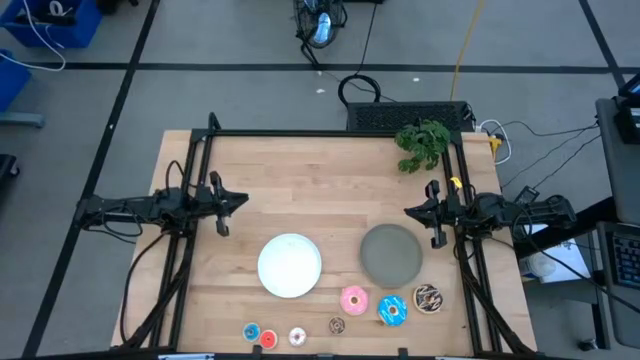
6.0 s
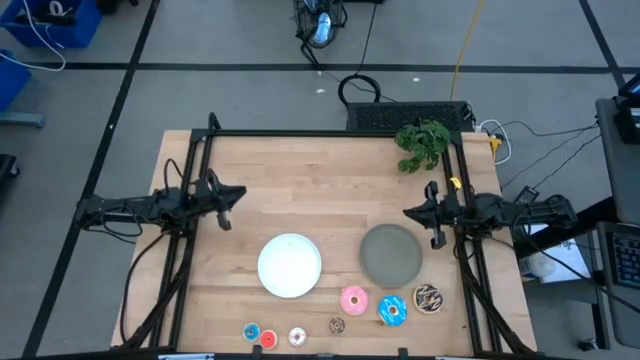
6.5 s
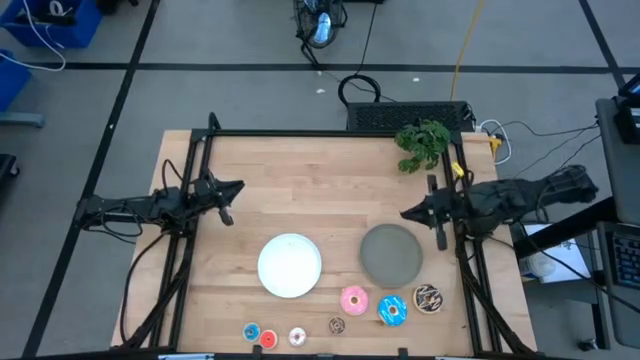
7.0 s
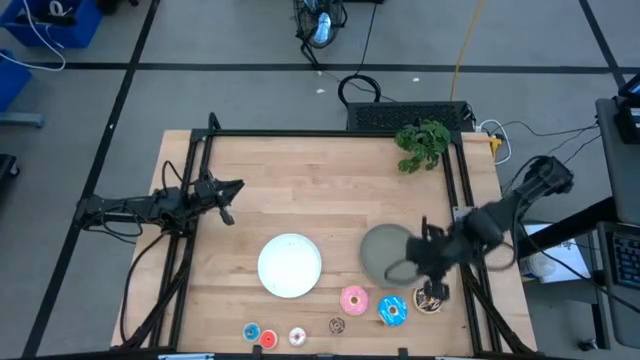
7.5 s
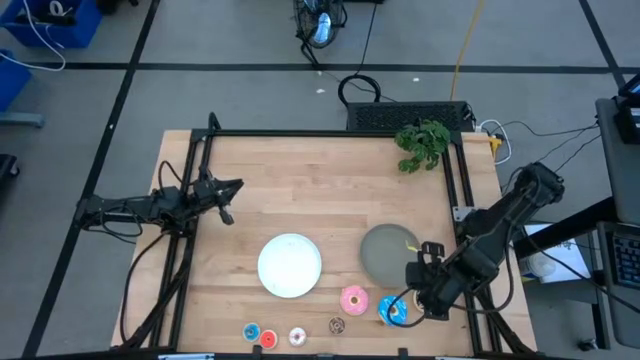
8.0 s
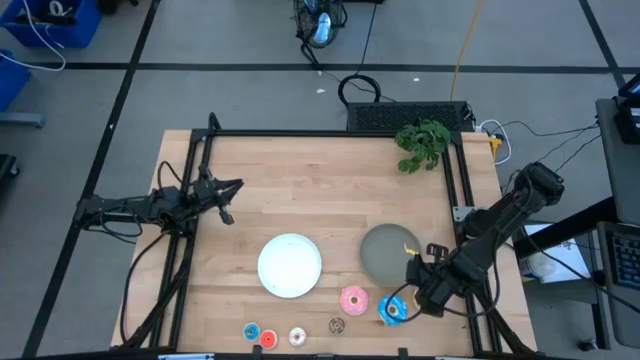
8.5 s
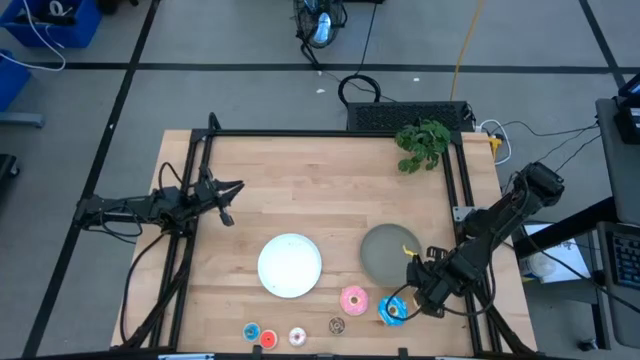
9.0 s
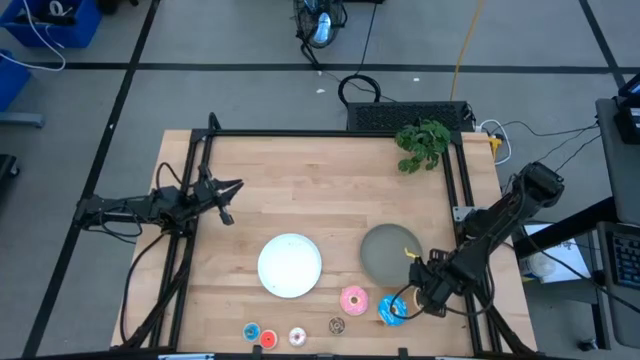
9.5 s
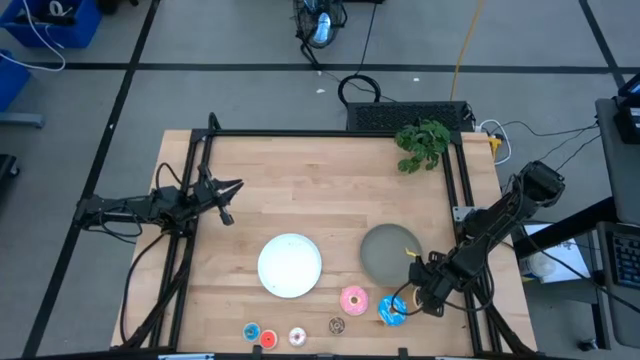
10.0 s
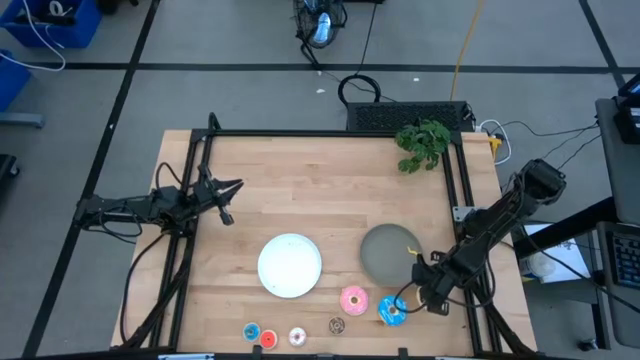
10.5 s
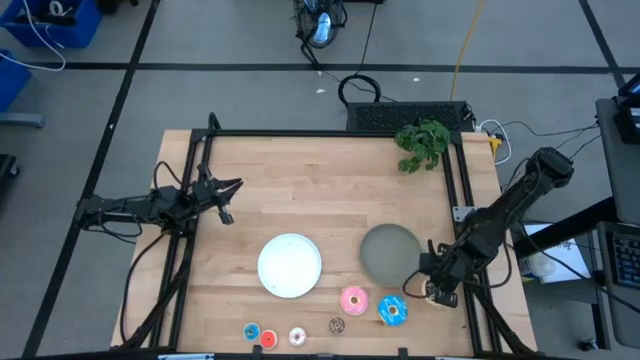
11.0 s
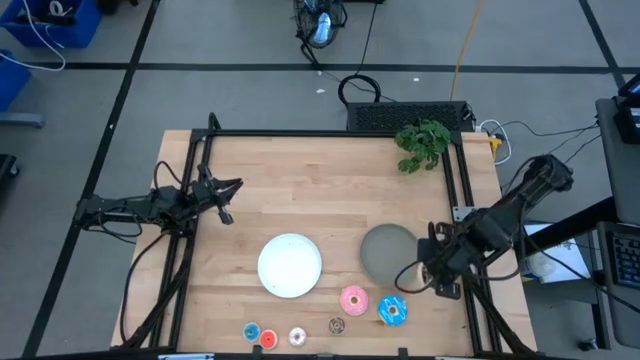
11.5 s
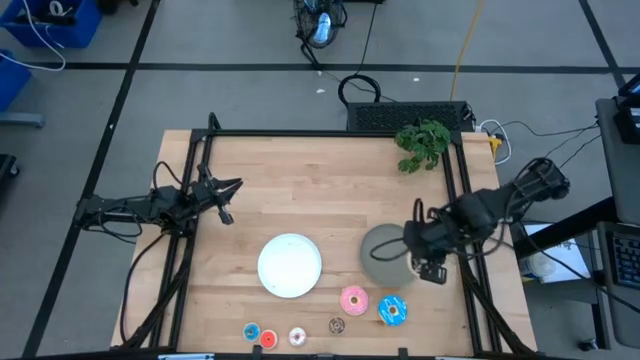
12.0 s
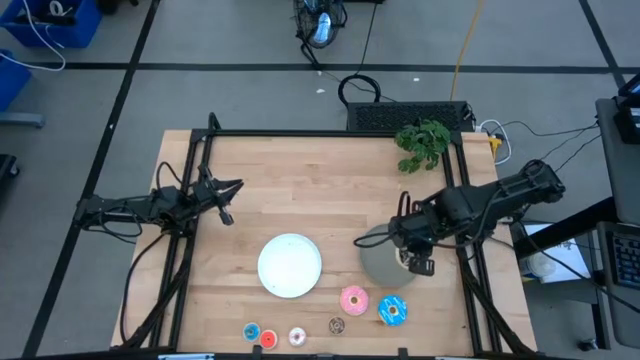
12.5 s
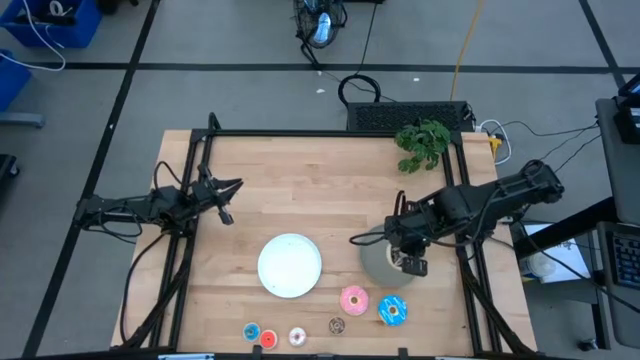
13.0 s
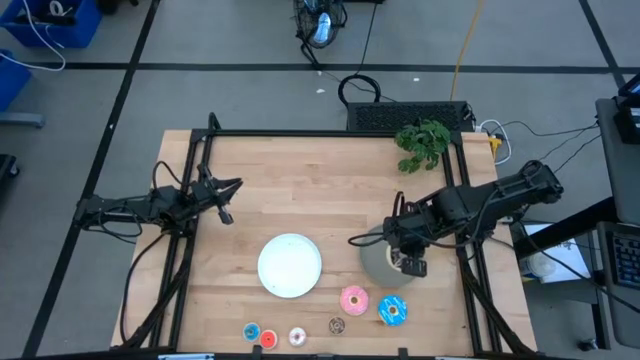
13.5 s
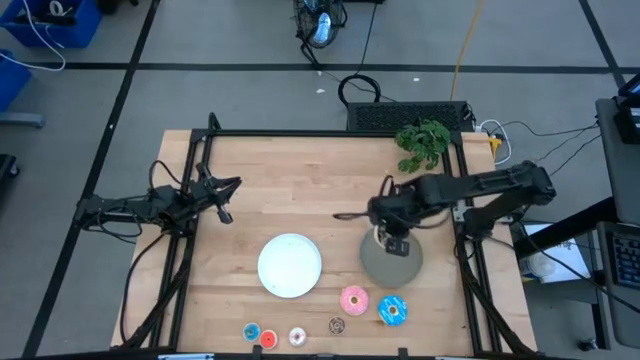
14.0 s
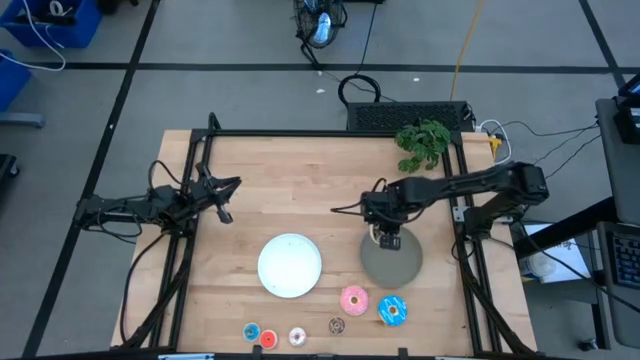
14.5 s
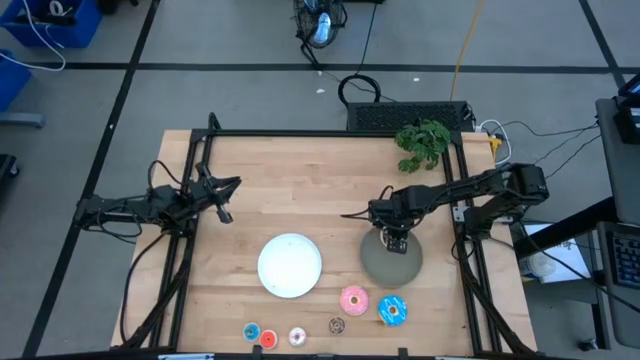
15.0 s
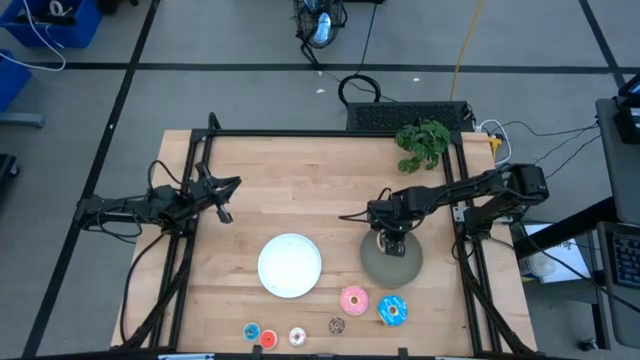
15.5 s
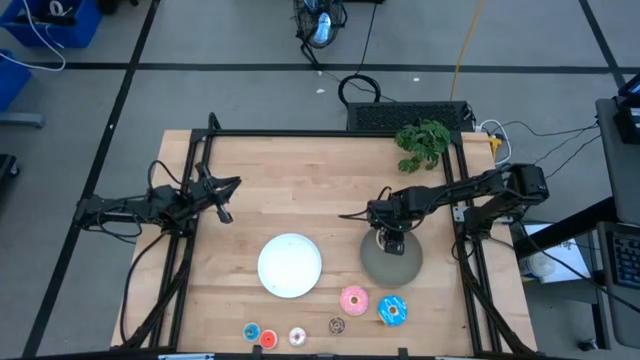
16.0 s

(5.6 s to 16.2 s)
Task: Pick & Place donuts
Put the large black donut on the gray plate

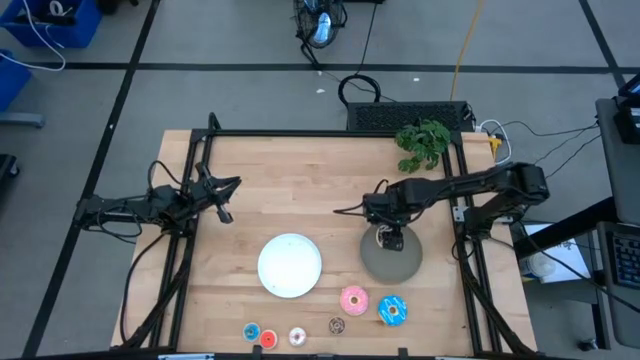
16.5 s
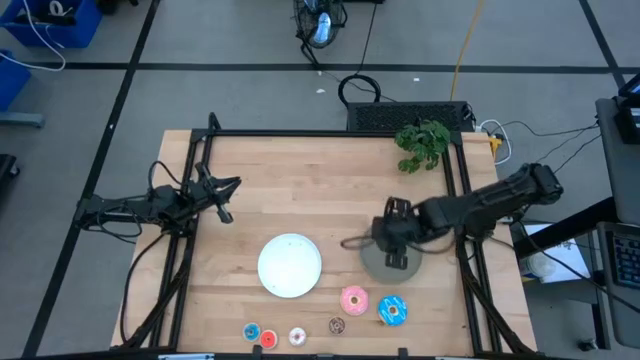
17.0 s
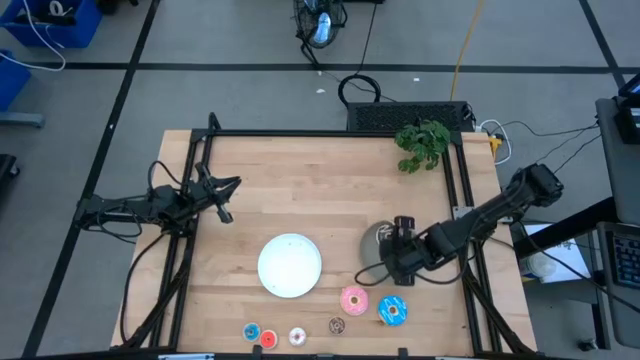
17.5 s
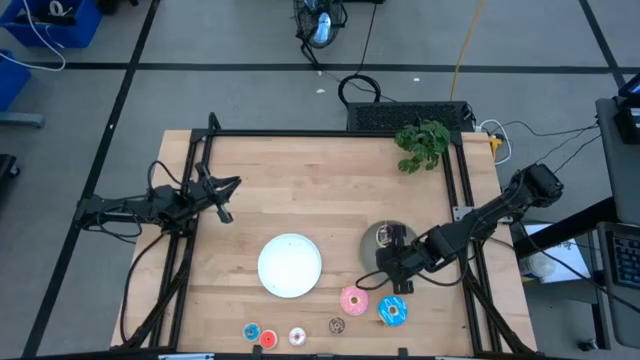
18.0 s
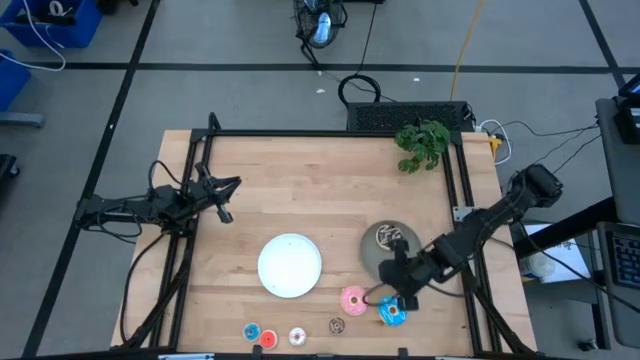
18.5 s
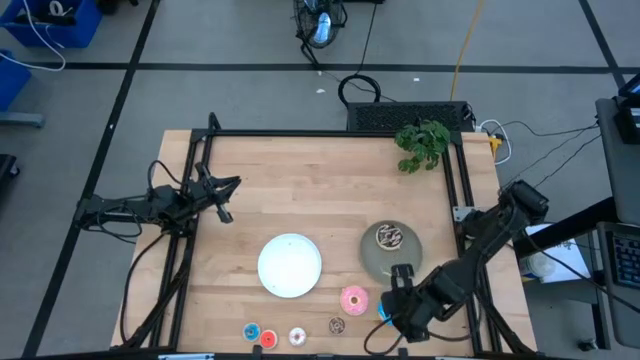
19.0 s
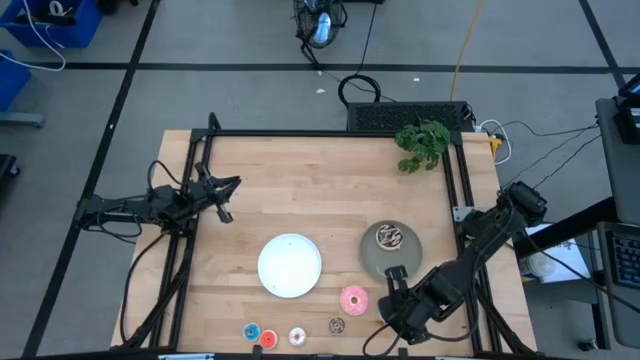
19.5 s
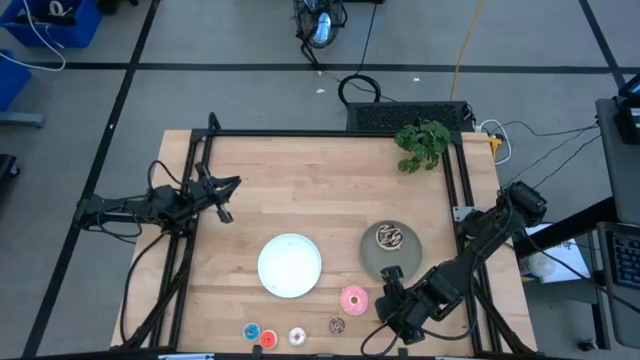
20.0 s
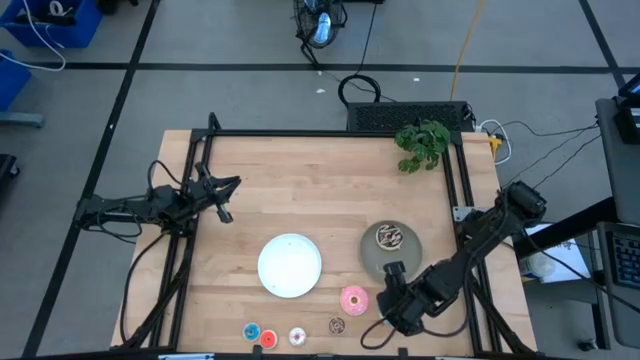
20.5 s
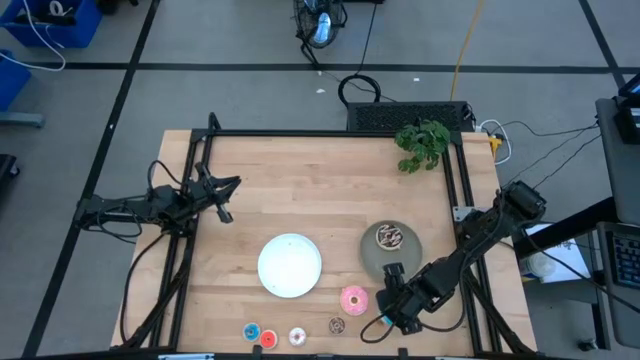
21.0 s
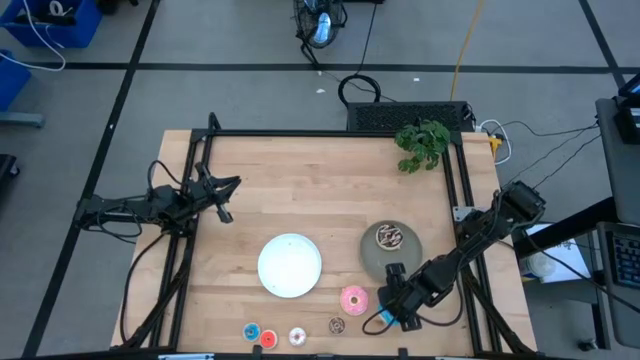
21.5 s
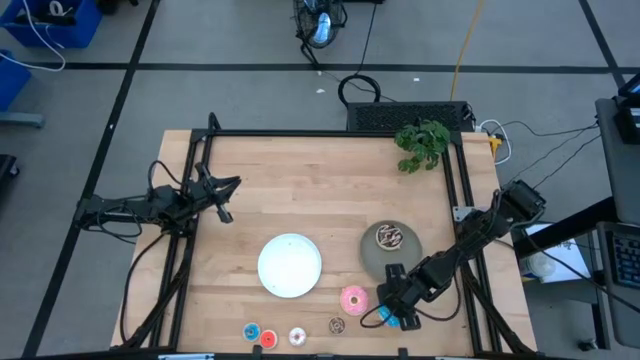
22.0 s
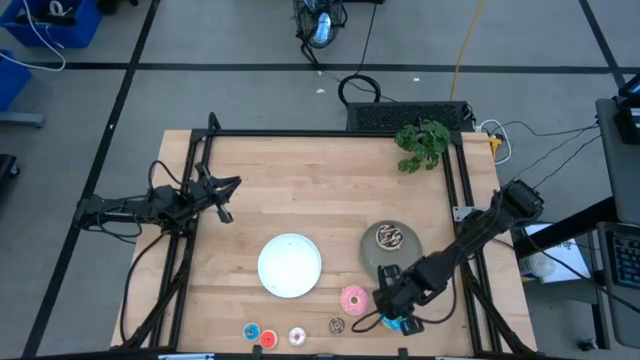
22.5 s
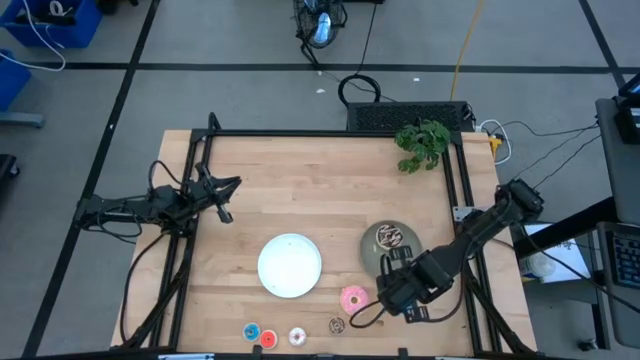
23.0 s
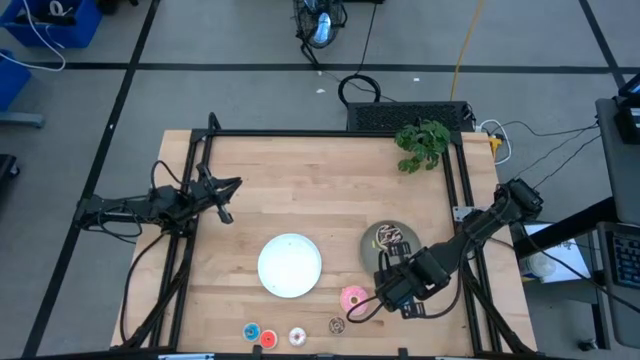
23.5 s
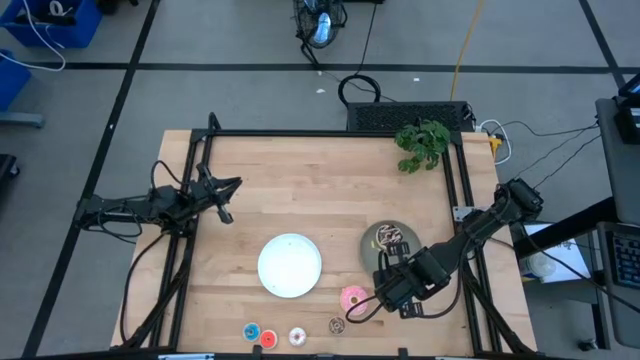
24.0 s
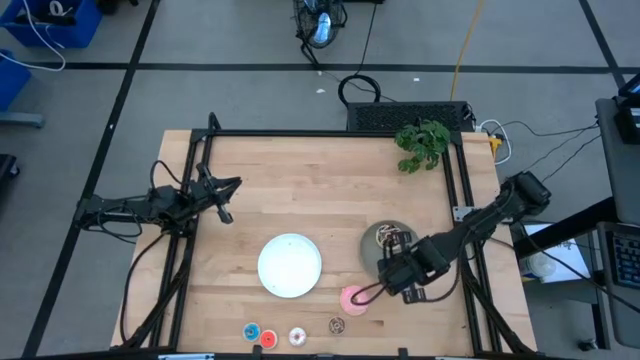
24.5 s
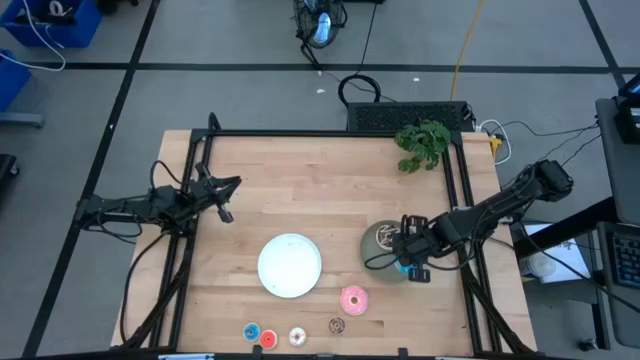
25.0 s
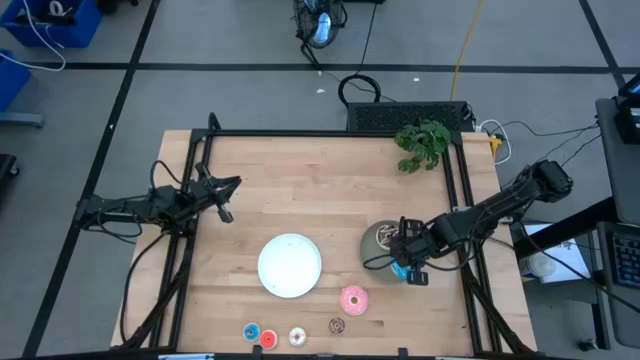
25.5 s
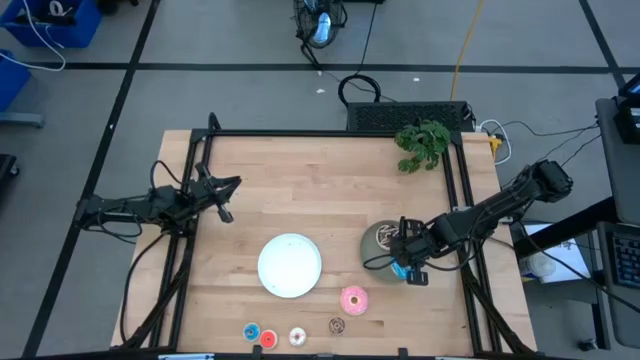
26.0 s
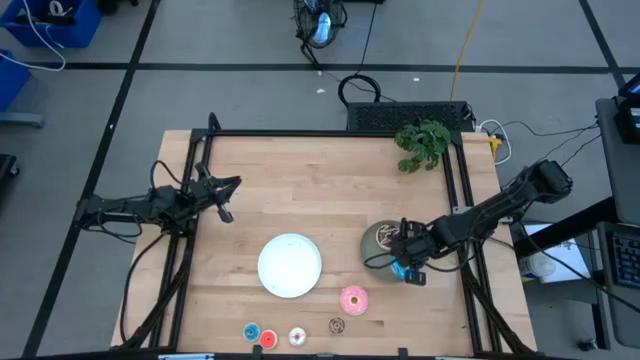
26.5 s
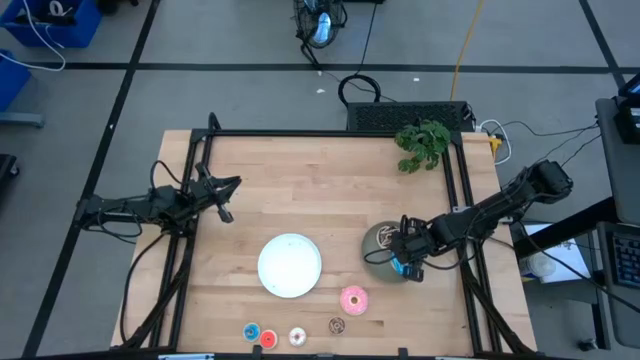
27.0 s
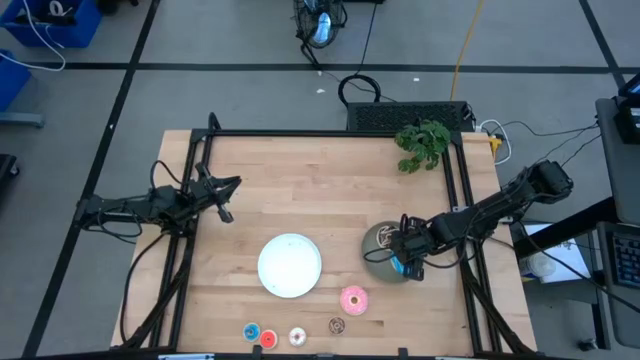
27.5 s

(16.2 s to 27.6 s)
Put the large blue donut on the gray plate
